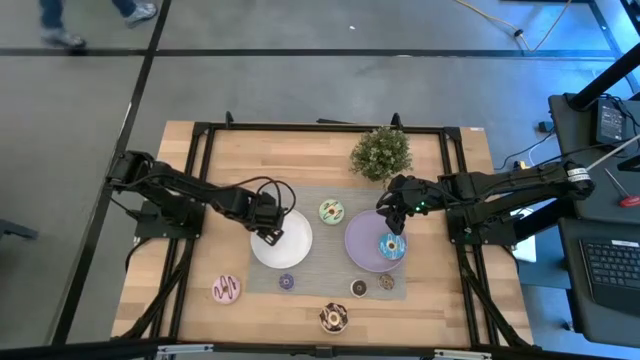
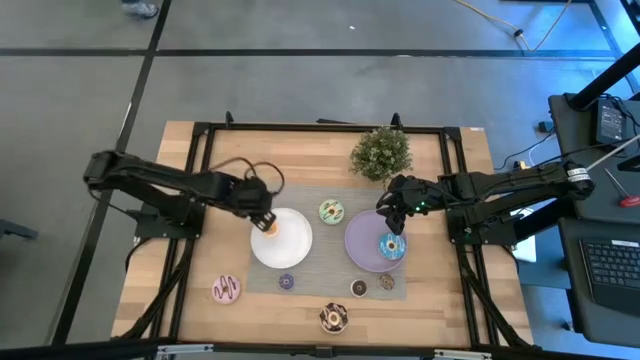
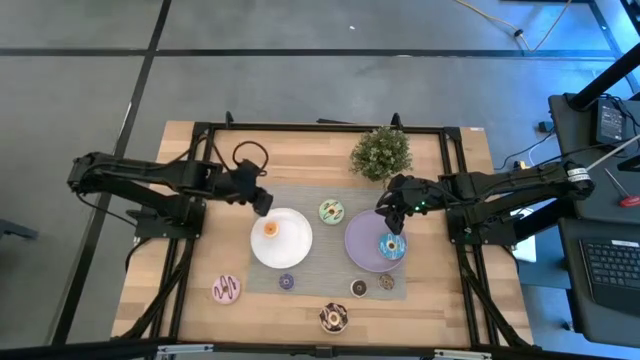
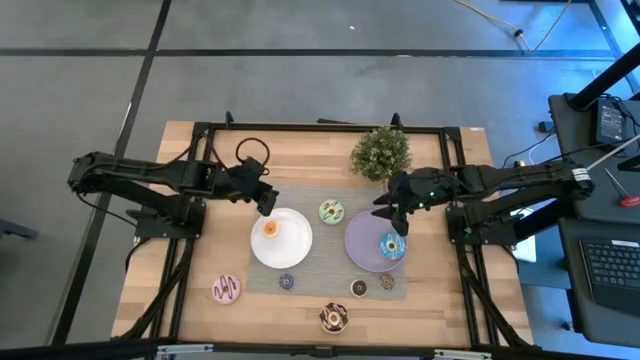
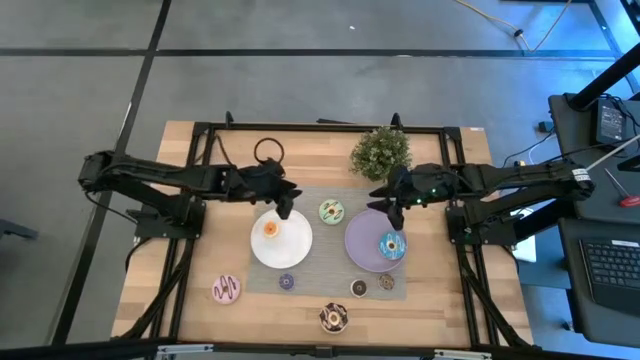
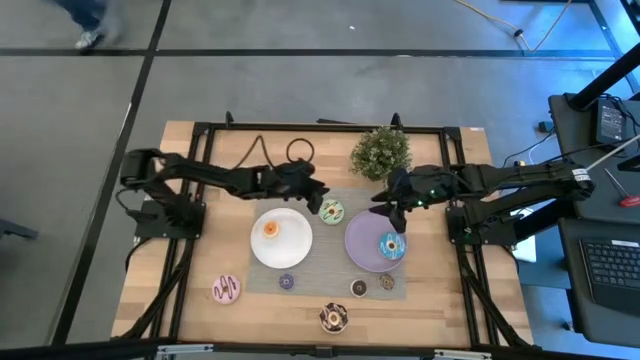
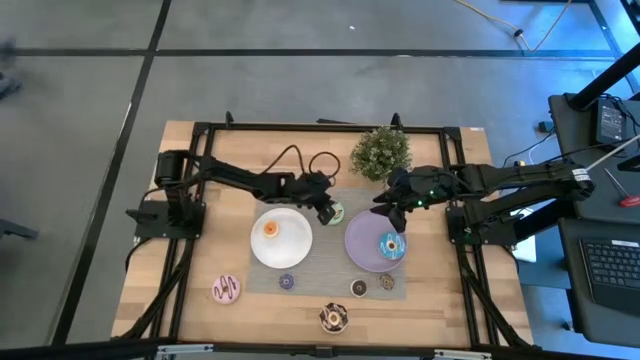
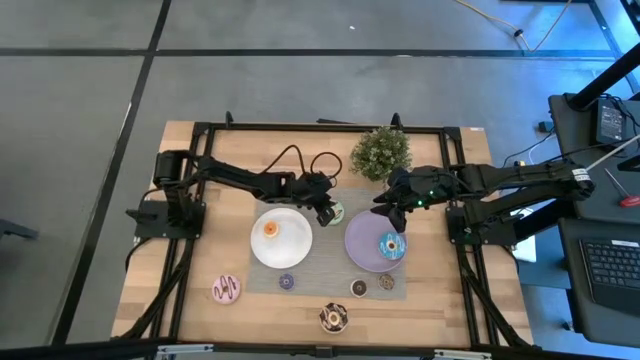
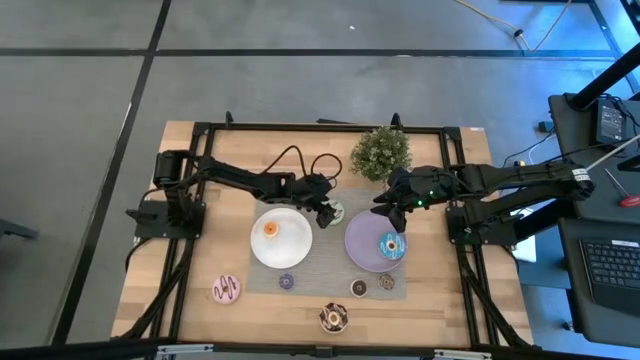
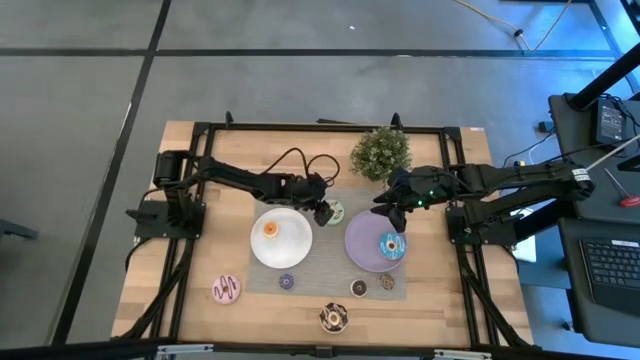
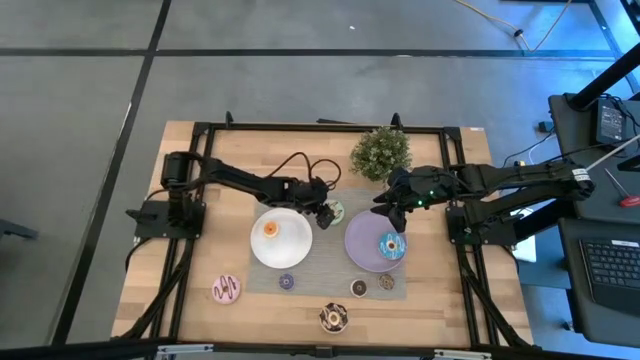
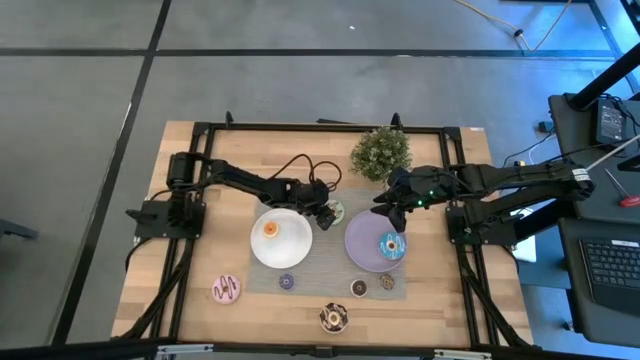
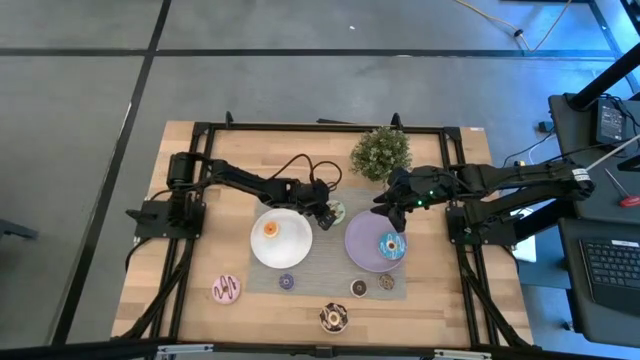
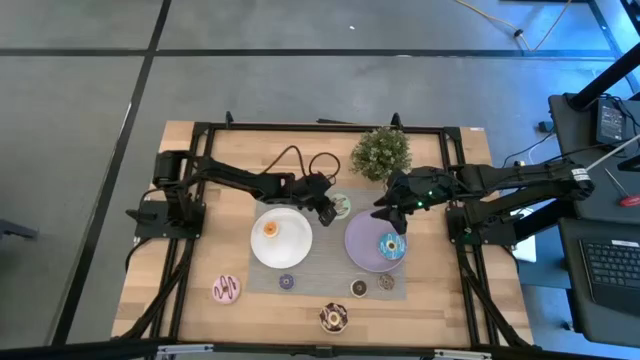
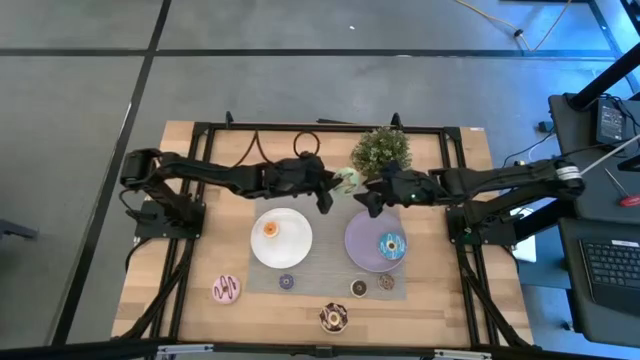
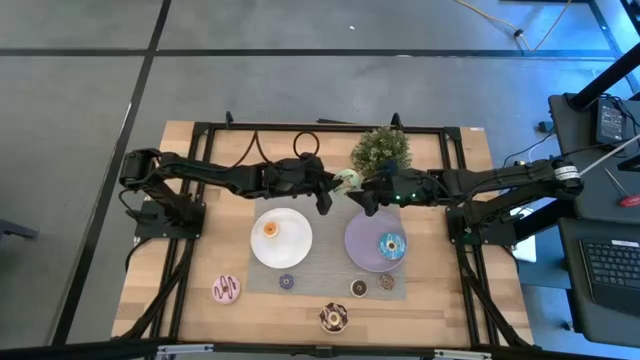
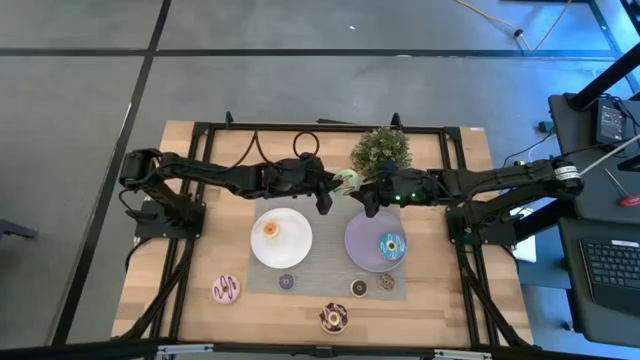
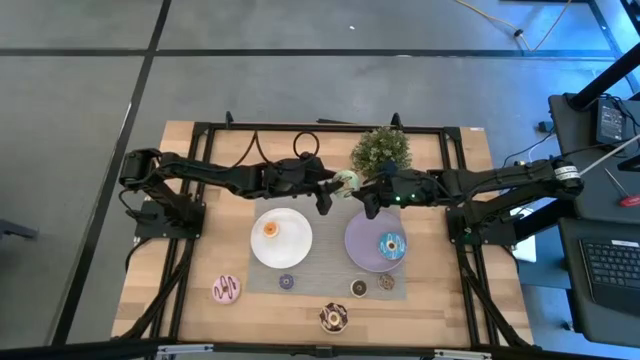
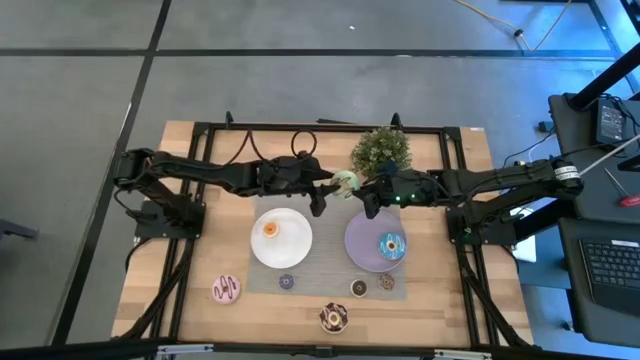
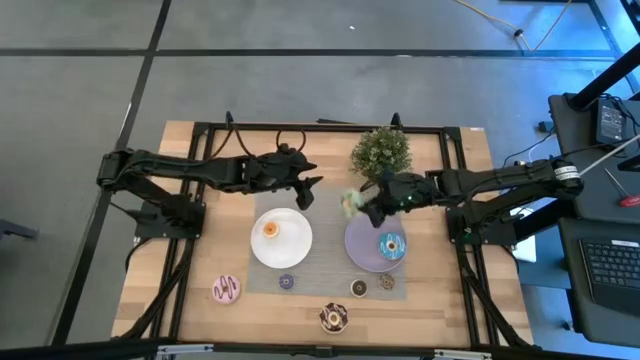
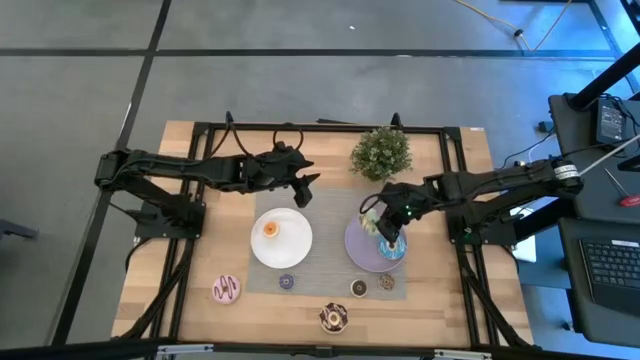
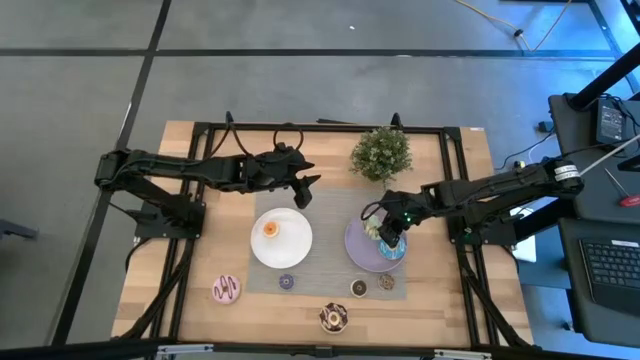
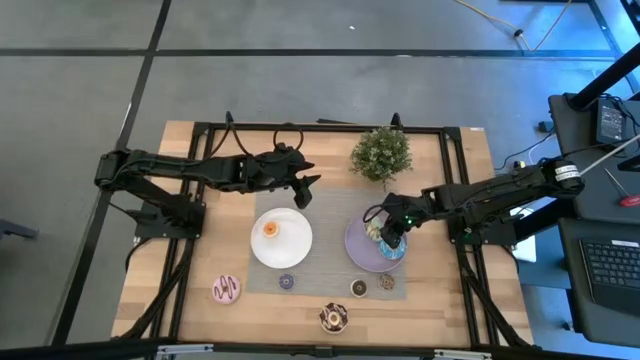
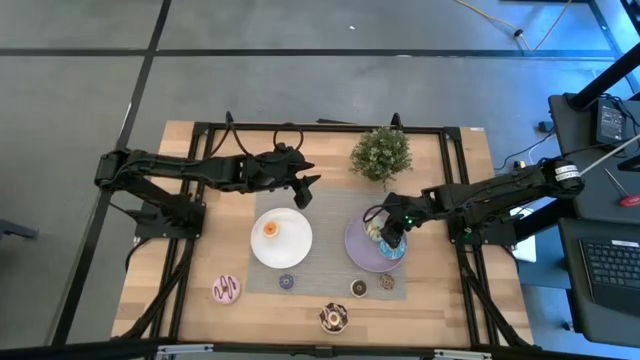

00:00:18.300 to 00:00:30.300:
Task: Pick & Place donuts
Put the big green donut on the purple plate

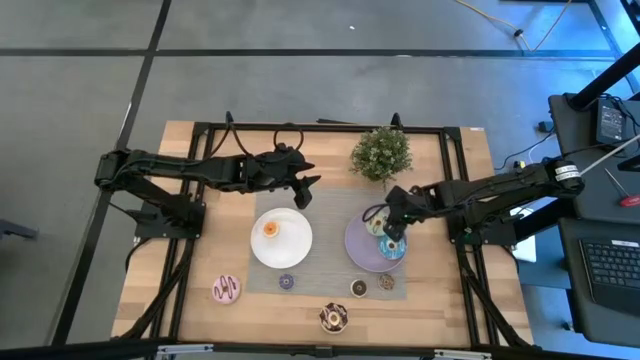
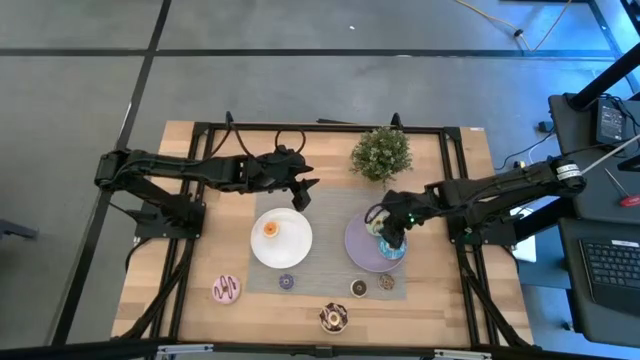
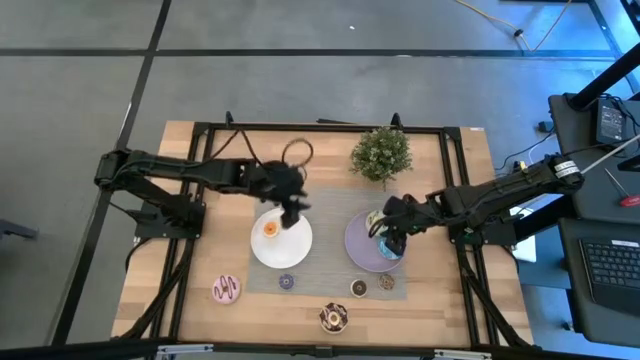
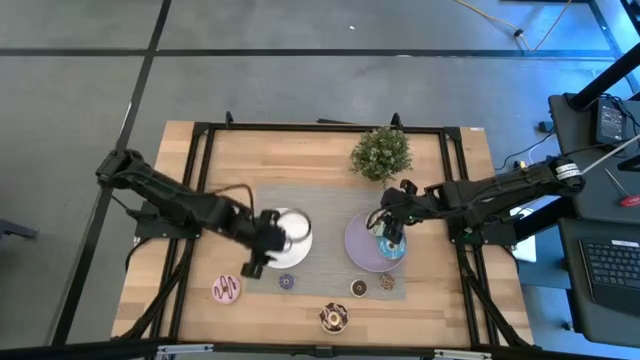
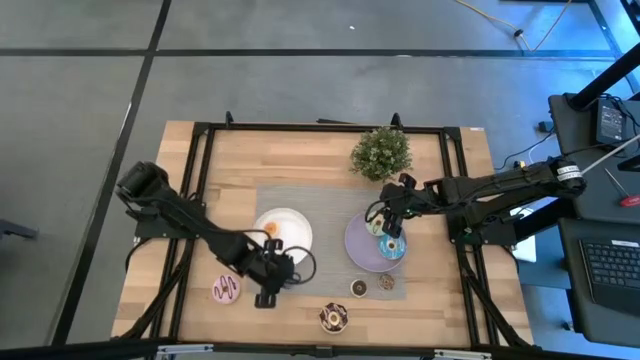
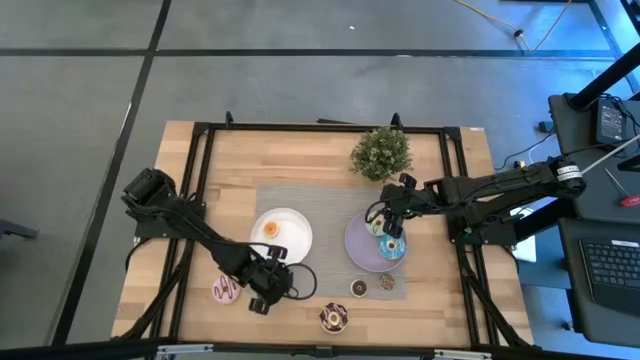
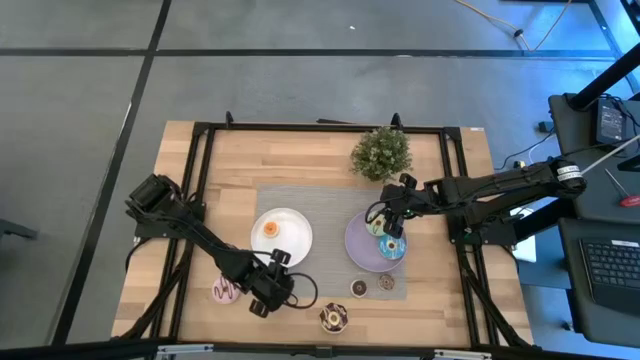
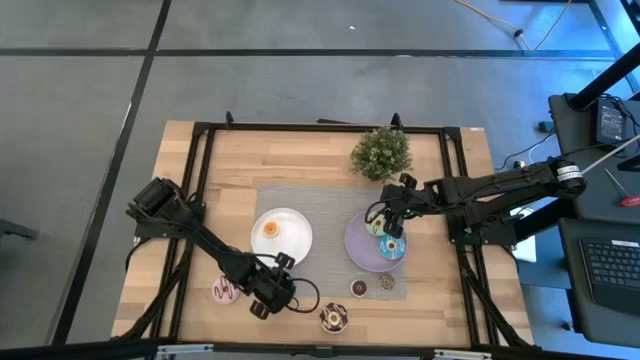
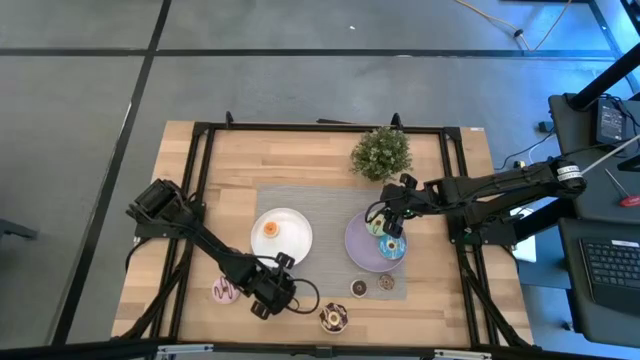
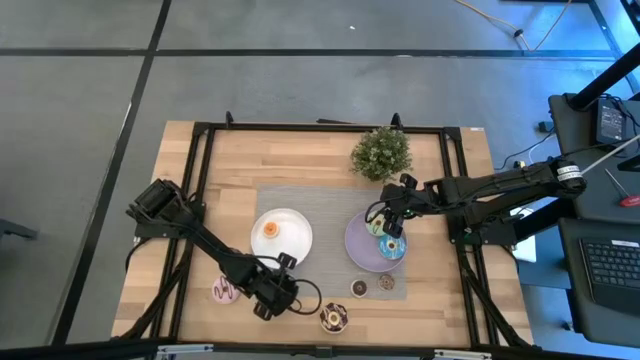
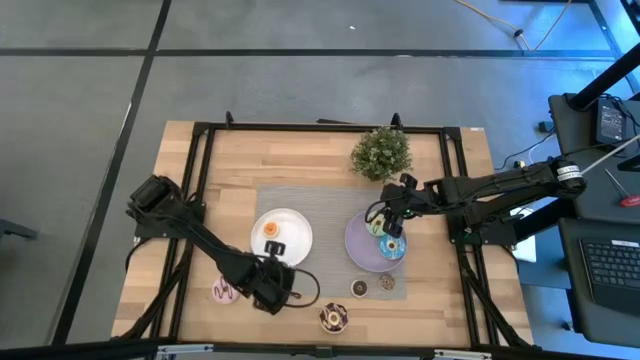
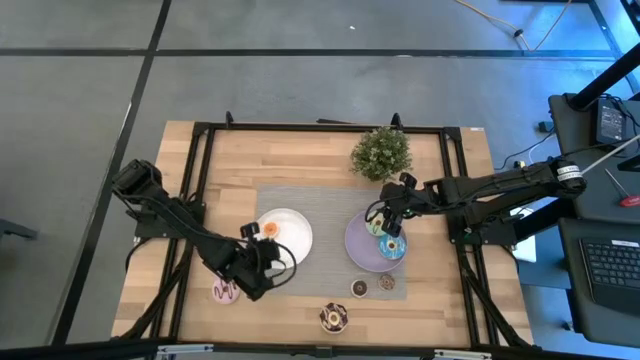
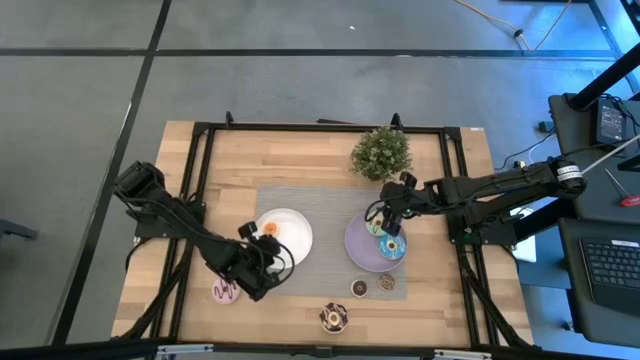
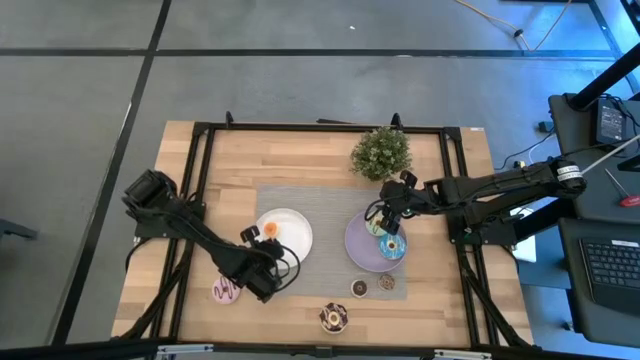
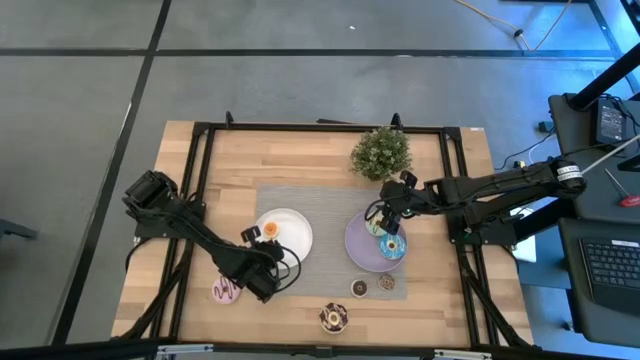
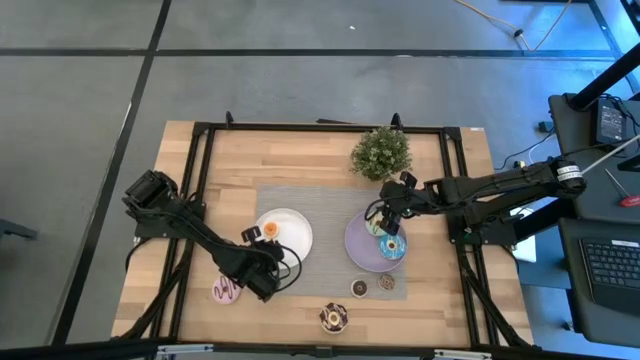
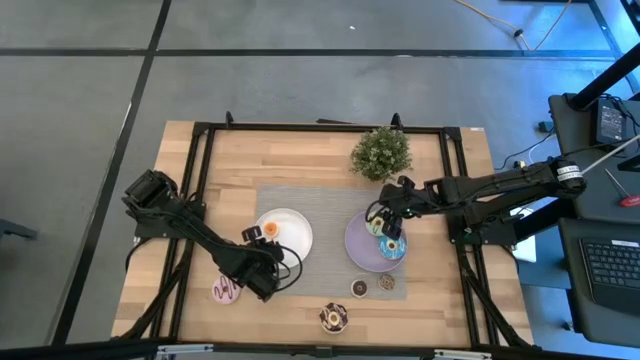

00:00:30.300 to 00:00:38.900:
Put the small purple donut on the white plate

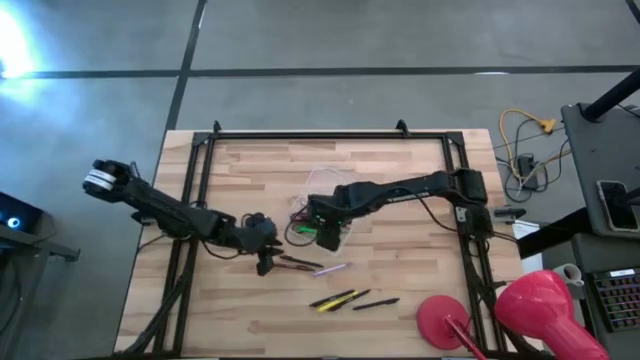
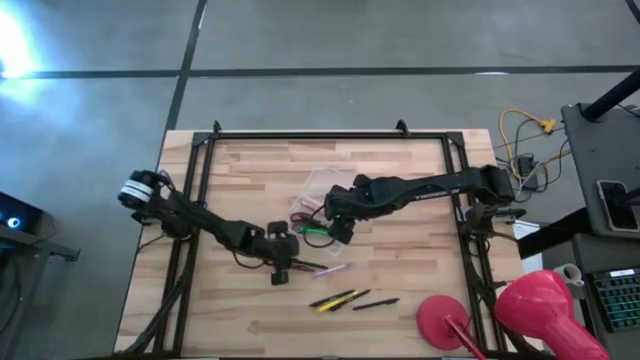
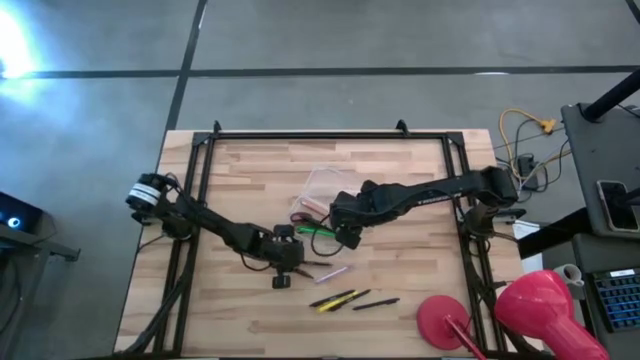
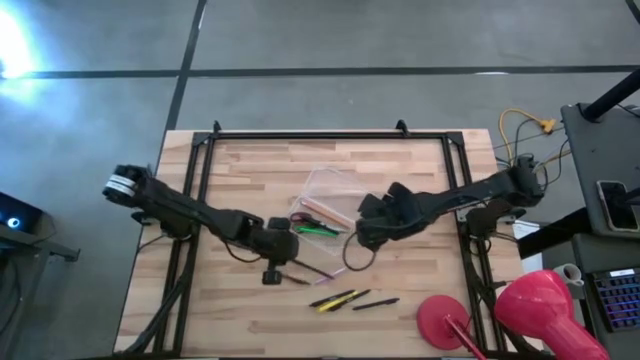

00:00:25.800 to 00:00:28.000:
Task: Pick & place school supplies into a supply box
Put the black pen into the transparent case
